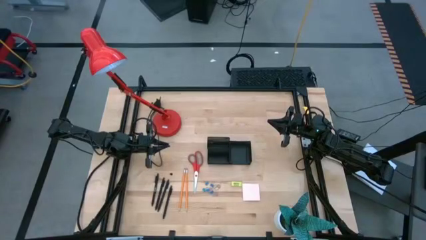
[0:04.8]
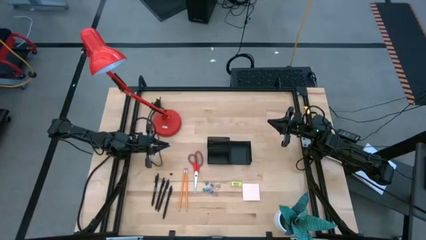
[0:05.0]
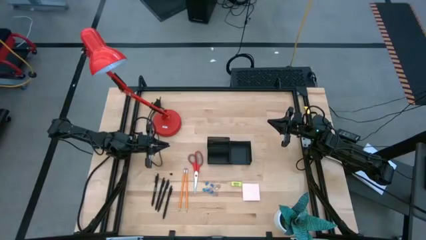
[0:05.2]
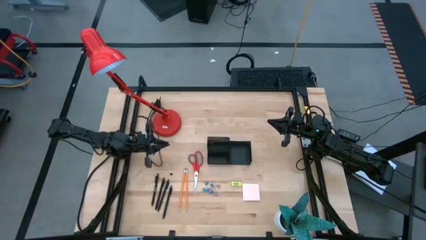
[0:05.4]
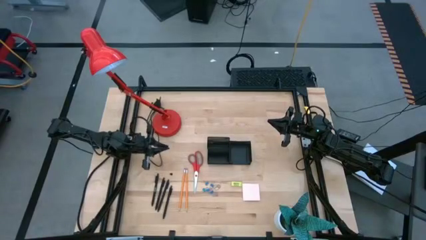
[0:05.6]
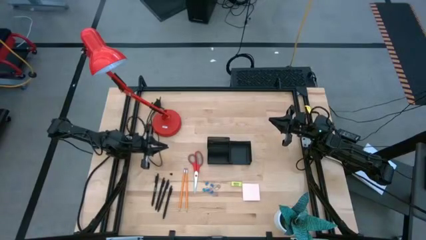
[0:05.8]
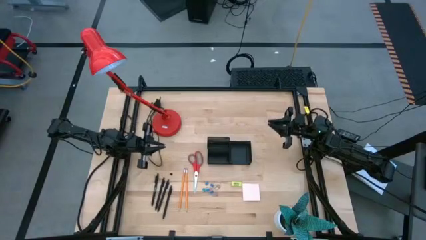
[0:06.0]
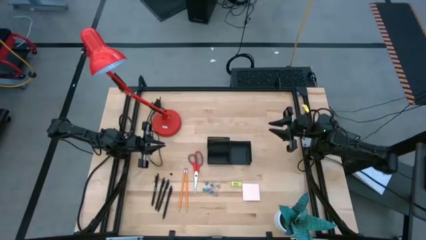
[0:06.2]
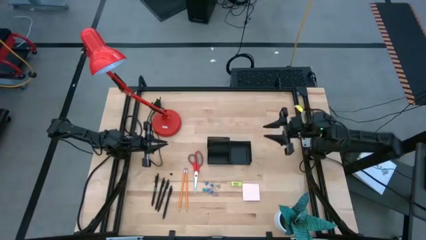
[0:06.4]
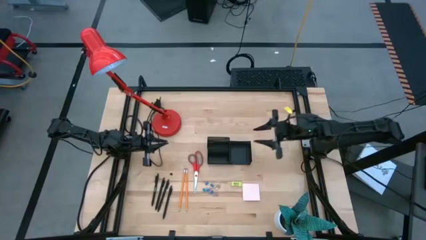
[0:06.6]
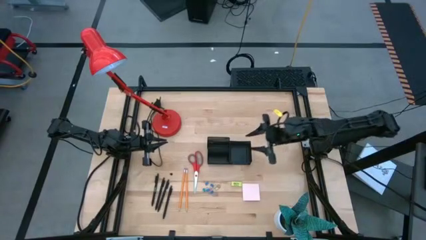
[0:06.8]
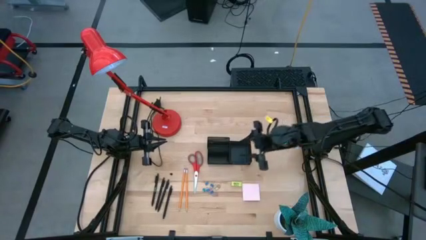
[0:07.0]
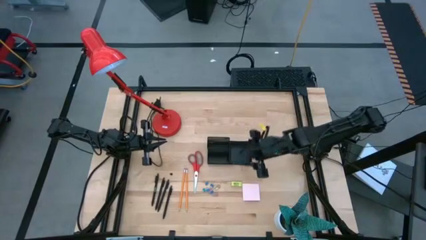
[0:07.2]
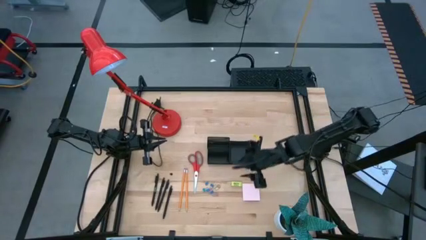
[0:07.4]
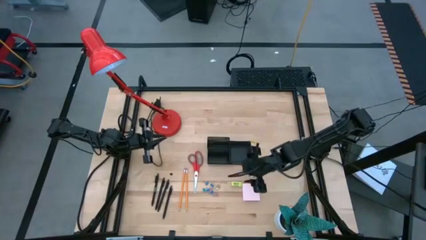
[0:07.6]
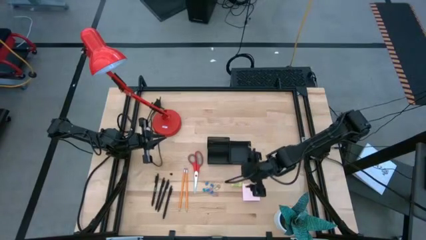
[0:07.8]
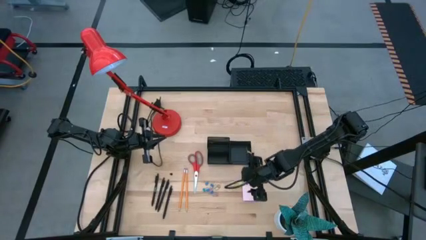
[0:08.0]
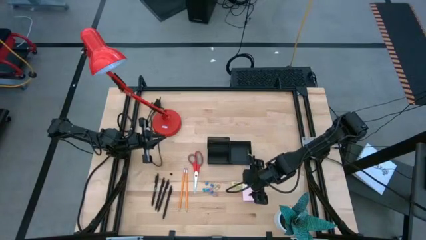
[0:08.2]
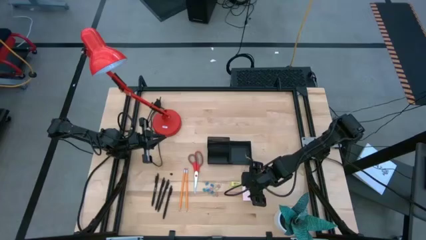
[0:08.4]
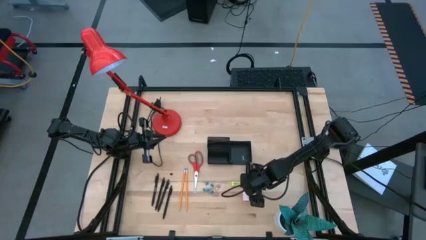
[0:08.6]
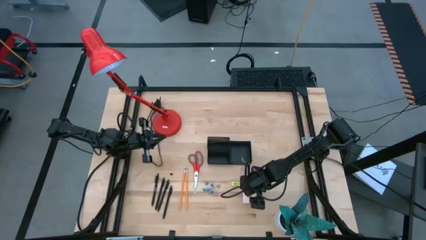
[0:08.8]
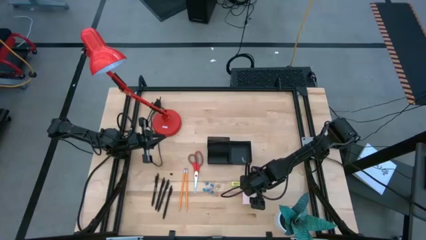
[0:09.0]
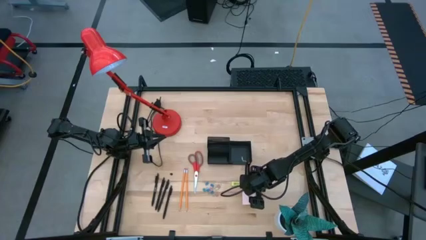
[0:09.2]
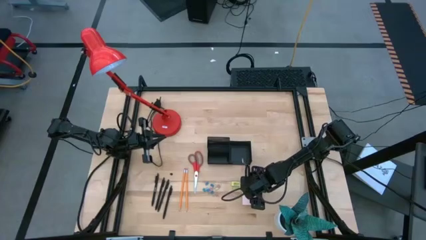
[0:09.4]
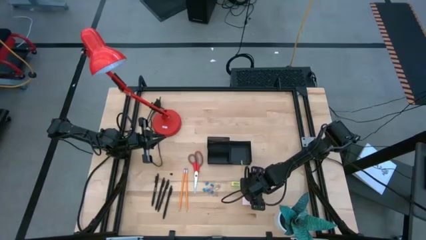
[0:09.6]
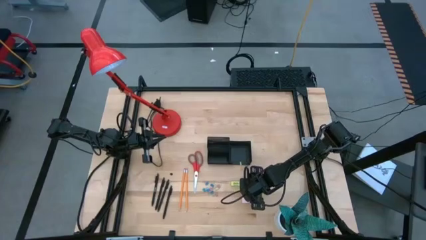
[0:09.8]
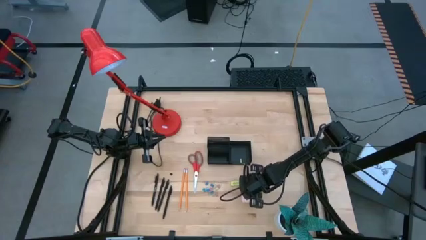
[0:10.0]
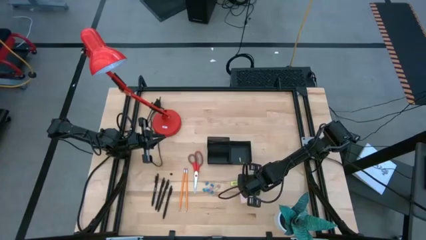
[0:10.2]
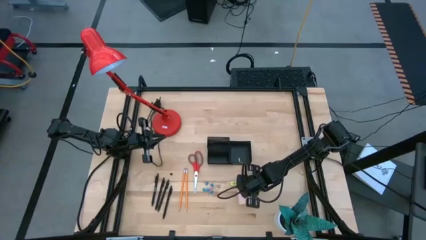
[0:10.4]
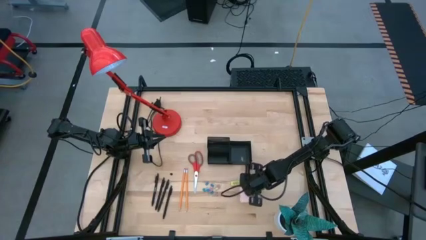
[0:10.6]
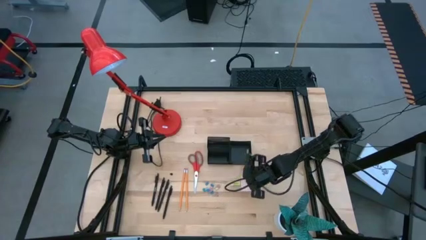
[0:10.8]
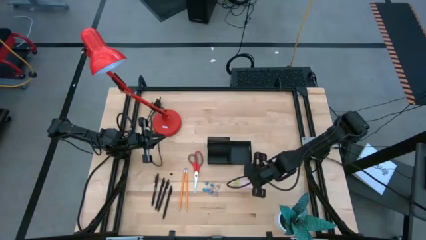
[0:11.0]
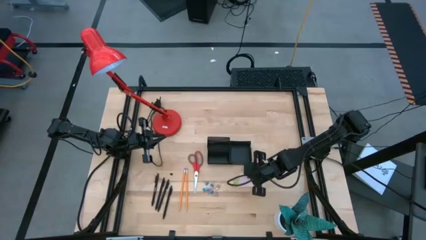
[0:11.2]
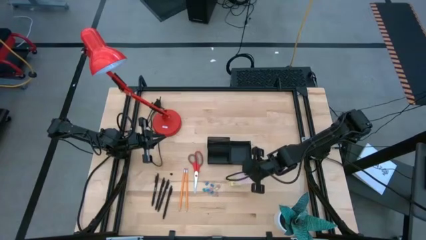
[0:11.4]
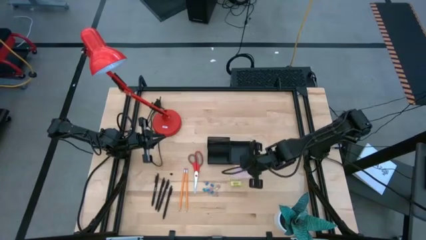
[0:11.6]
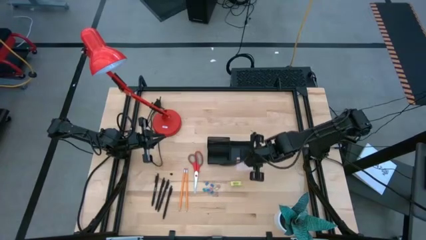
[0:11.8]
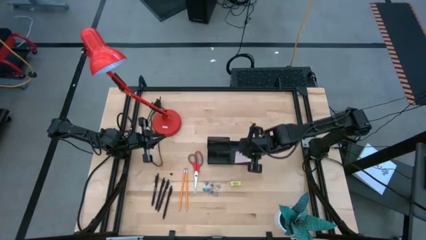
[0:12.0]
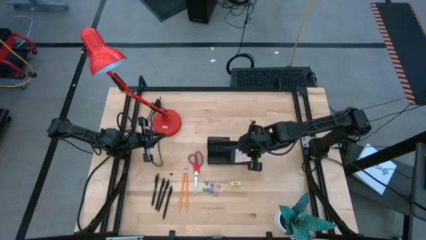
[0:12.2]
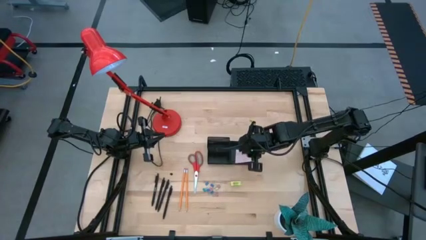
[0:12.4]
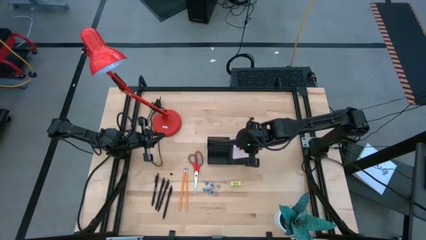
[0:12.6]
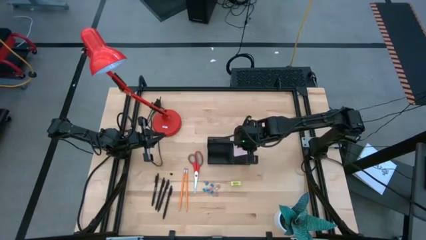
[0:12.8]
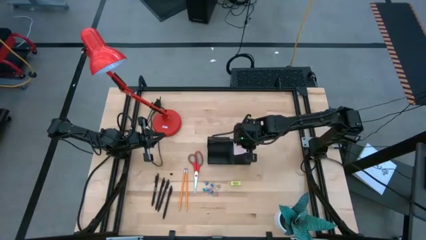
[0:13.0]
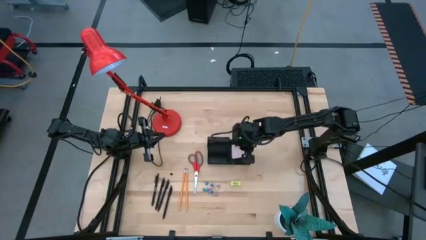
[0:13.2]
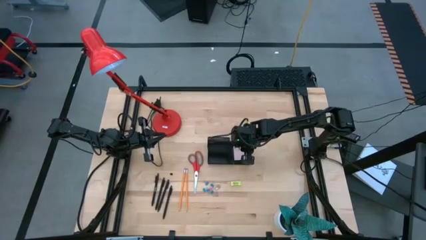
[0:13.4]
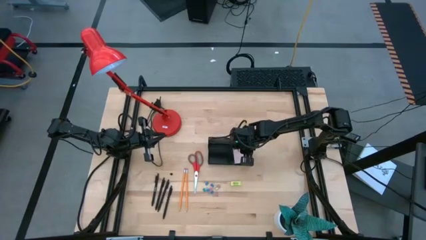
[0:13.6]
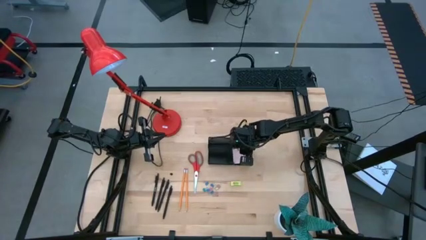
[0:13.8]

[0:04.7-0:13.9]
Task: Pick and place office supplies into organizer
Put the pink sticky note into the black desk organizer

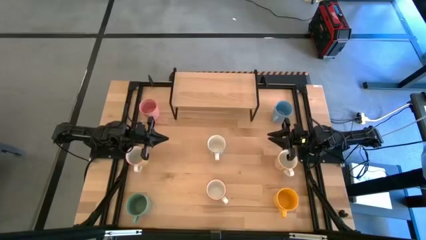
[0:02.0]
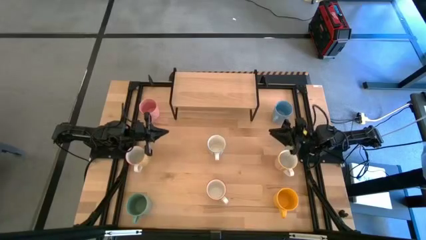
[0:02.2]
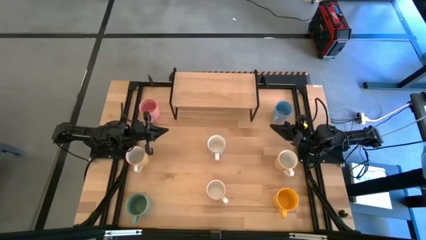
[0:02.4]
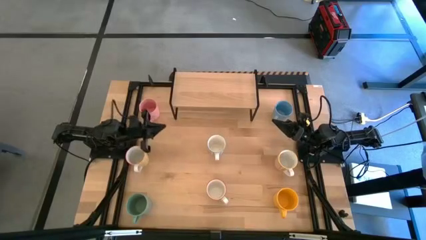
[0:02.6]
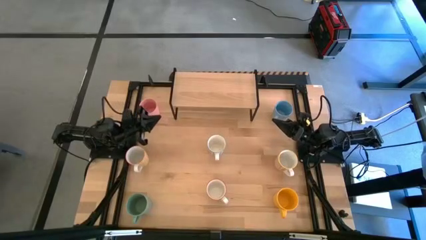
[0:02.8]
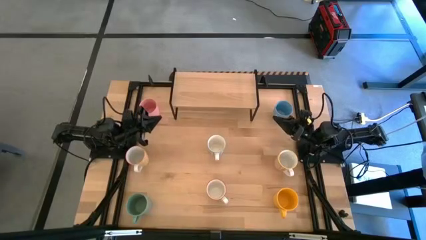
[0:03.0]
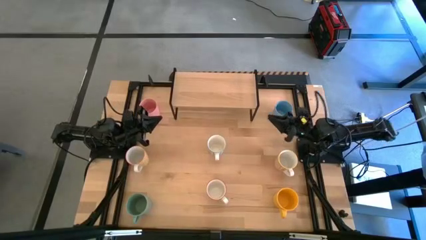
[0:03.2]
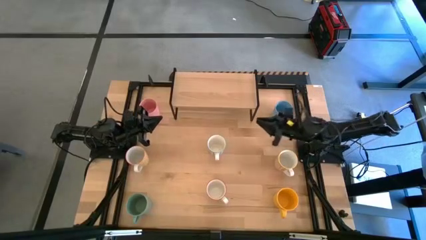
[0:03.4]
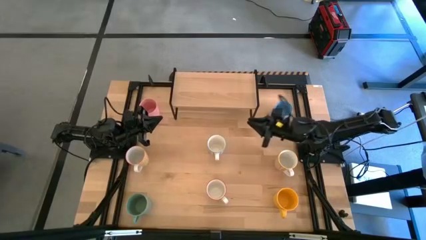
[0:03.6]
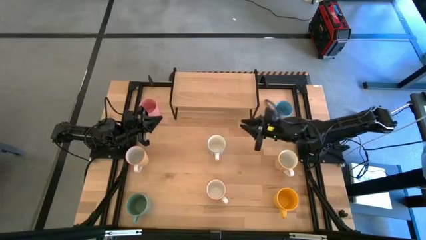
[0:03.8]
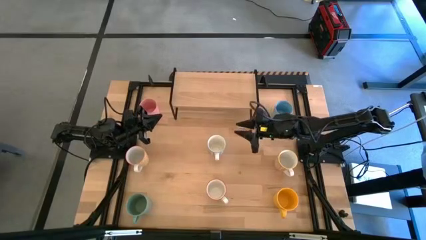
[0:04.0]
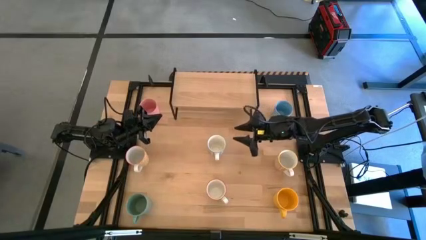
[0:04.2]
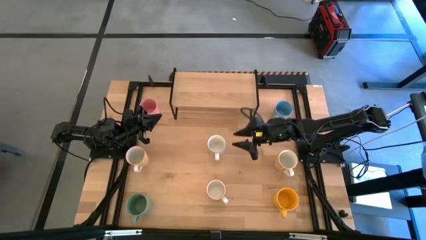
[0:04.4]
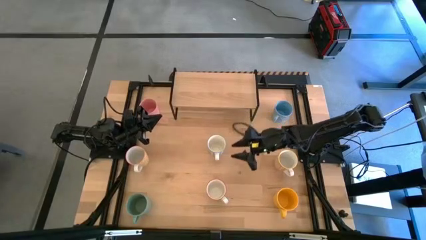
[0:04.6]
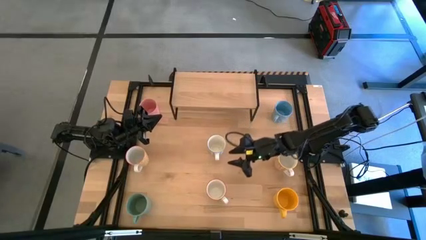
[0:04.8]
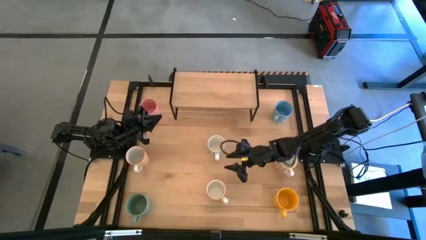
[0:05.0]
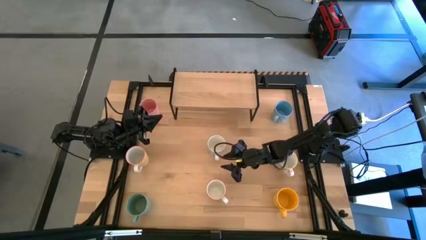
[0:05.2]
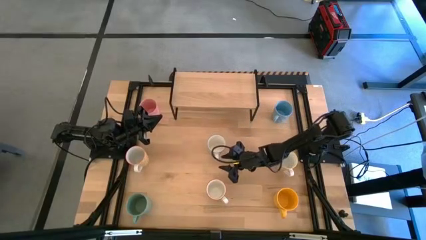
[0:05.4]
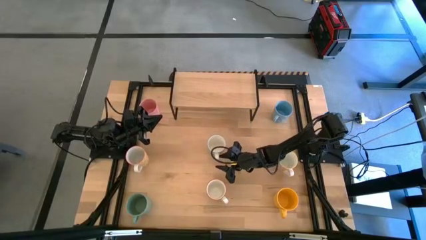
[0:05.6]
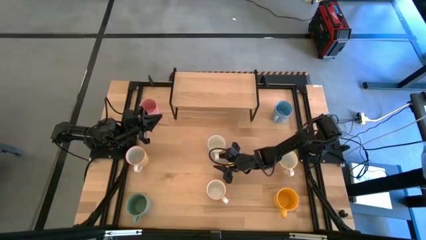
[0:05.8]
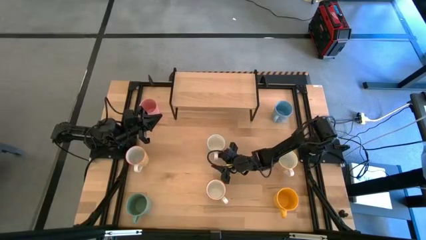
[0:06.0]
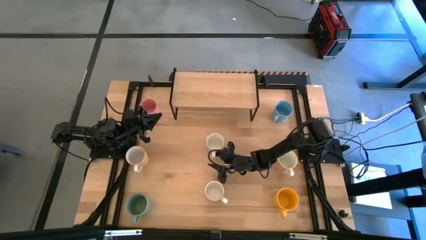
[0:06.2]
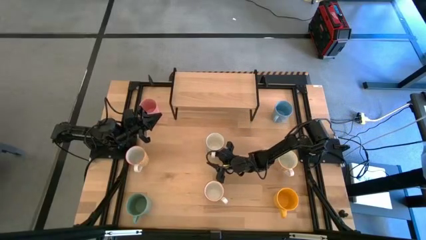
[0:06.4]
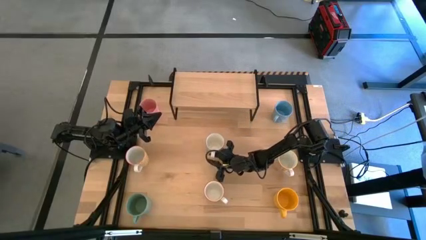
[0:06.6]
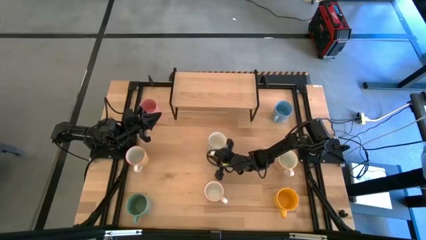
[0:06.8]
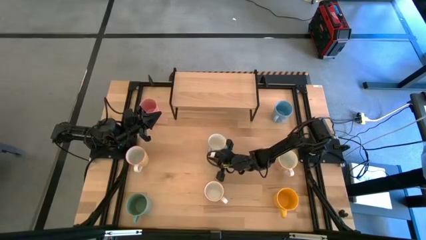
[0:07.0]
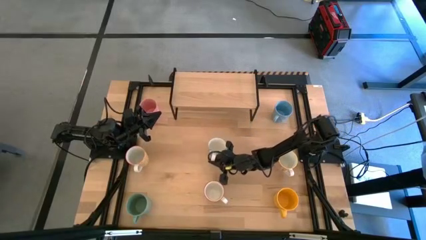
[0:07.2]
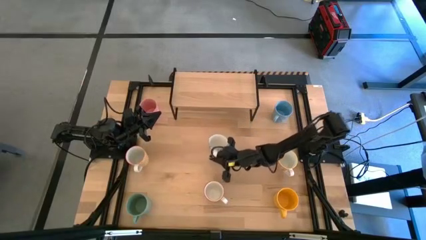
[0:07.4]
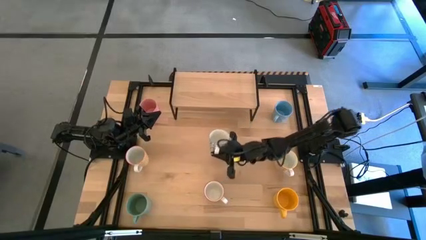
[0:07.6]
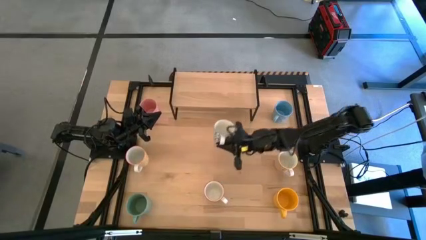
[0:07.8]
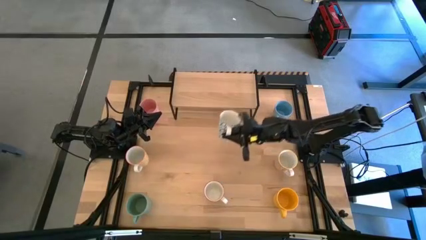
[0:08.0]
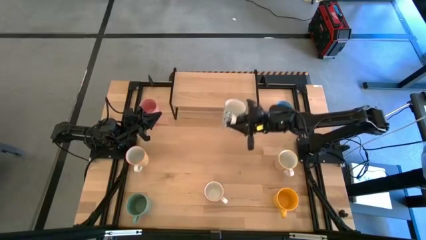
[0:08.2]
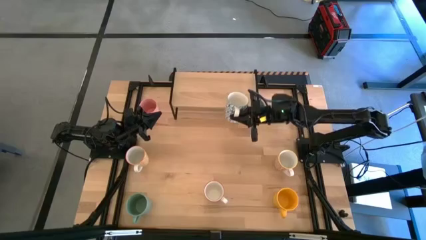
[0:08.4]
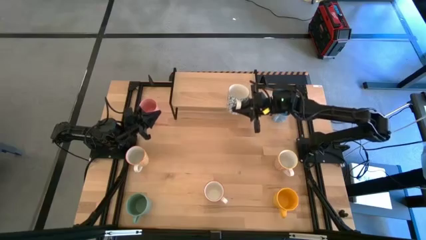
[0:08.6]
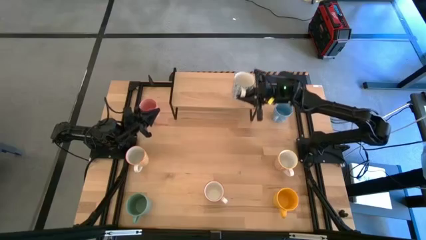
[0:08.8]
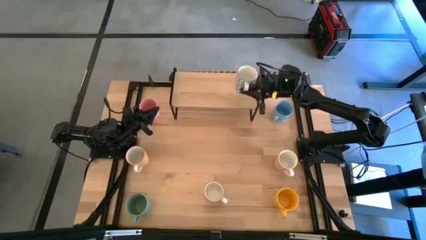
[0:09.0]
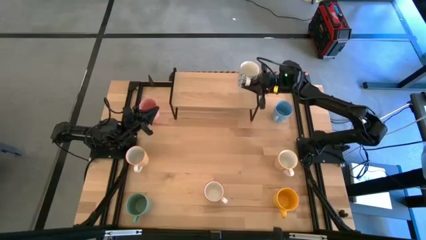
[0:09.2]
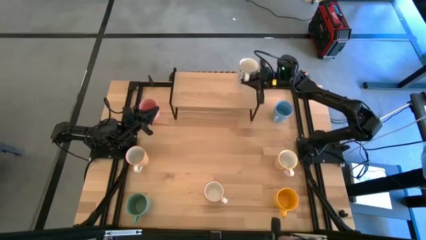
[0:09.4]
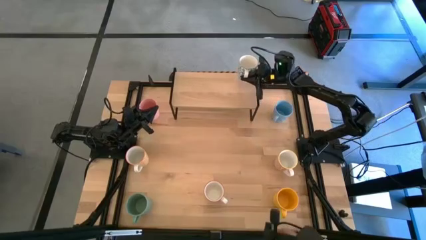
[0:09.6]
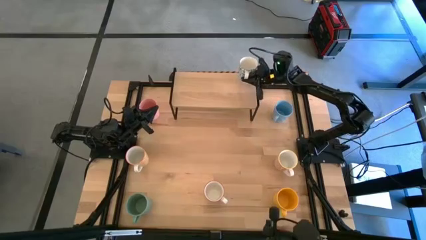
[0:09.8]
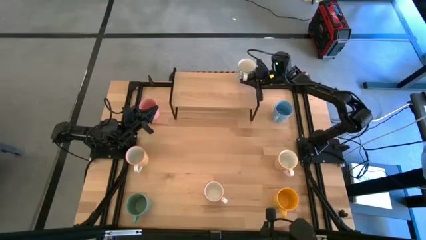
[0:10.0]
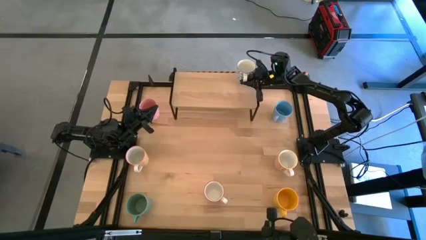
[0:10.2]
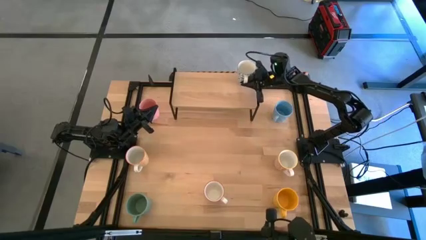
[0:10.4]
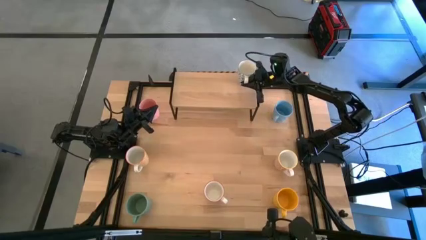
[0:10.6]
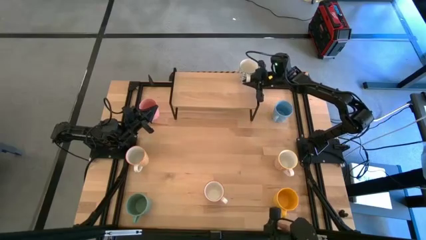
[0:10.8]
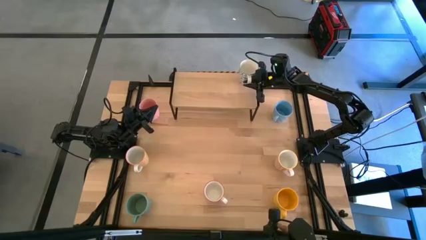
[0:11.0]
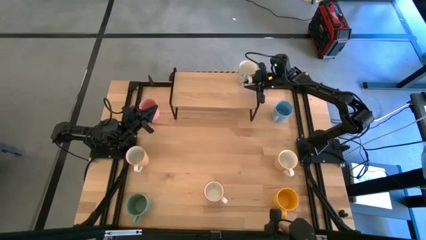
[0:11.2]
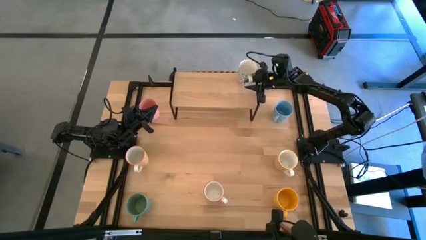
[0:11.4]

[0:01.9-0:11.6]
Task: Place coffee mugs
Put the blue patterned mug on the shelf
